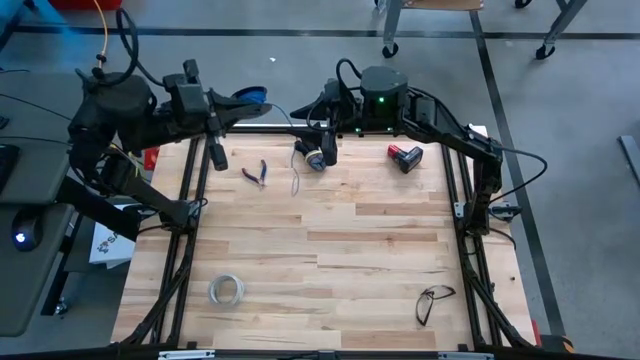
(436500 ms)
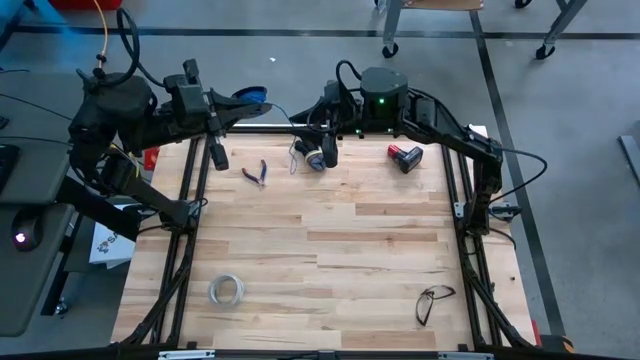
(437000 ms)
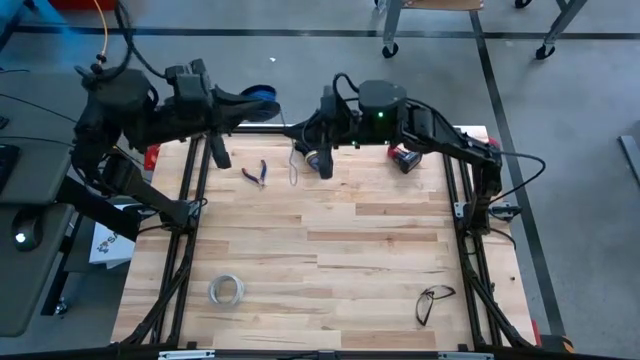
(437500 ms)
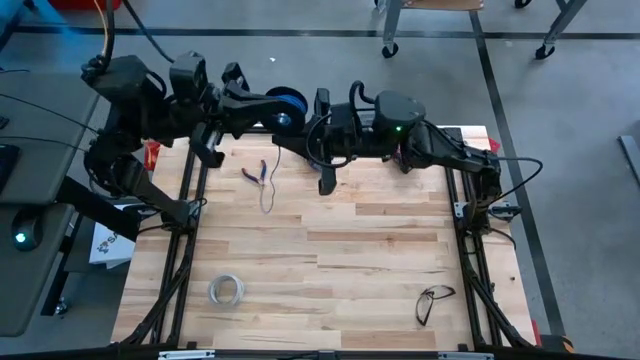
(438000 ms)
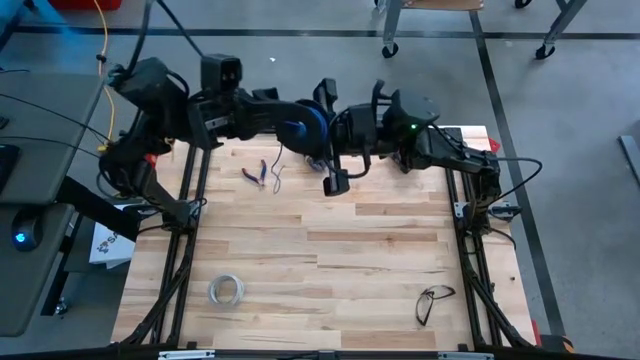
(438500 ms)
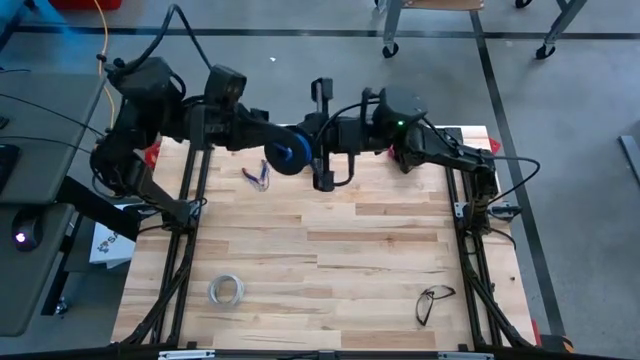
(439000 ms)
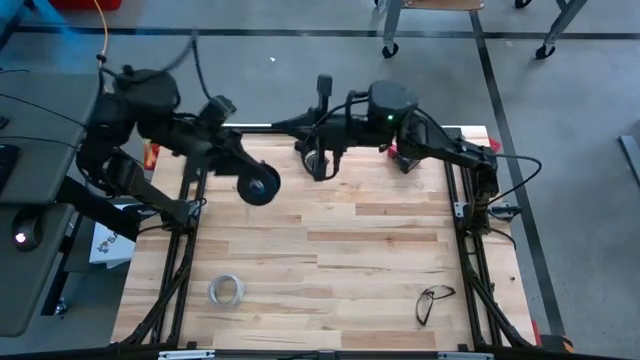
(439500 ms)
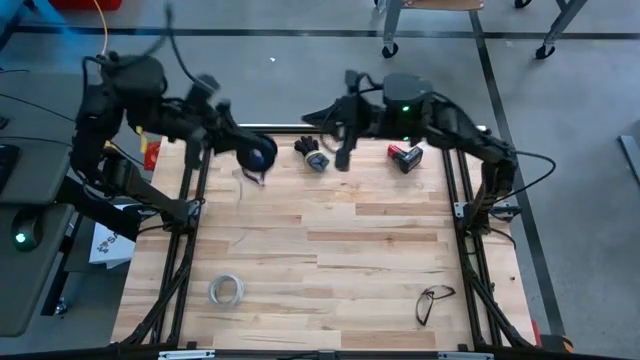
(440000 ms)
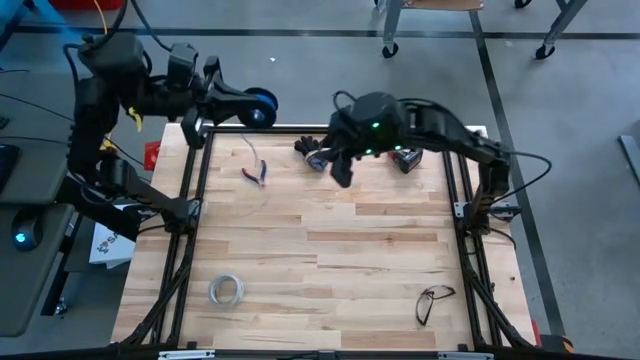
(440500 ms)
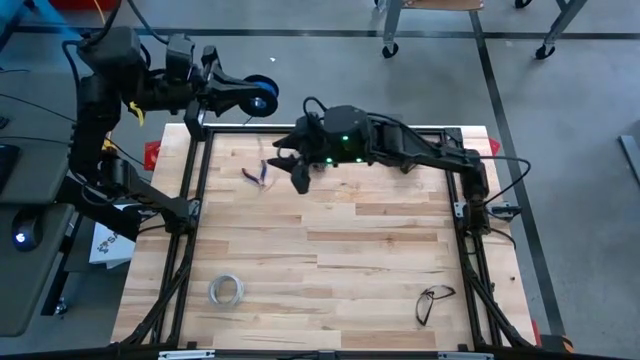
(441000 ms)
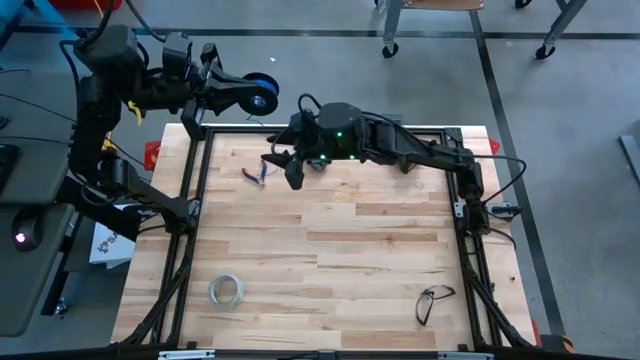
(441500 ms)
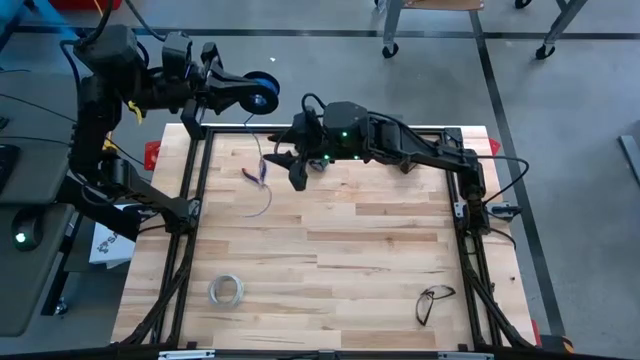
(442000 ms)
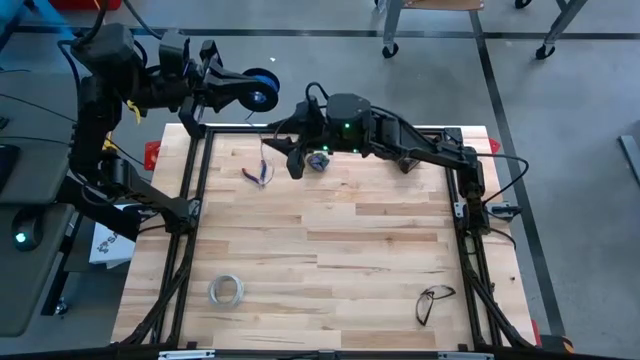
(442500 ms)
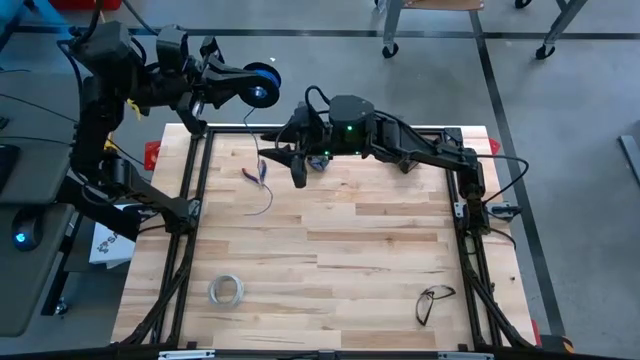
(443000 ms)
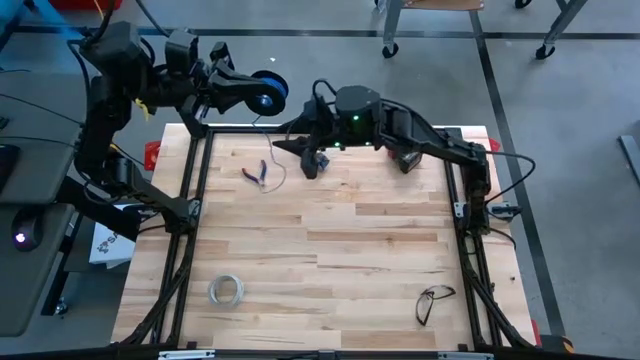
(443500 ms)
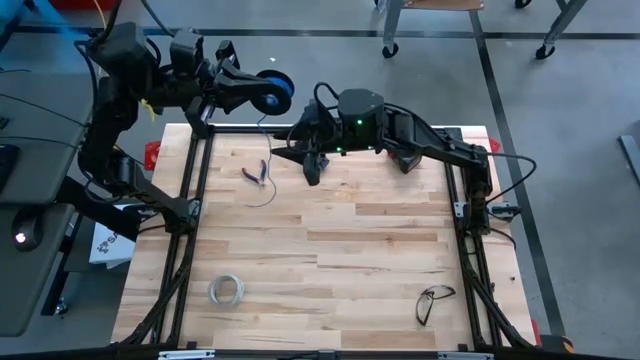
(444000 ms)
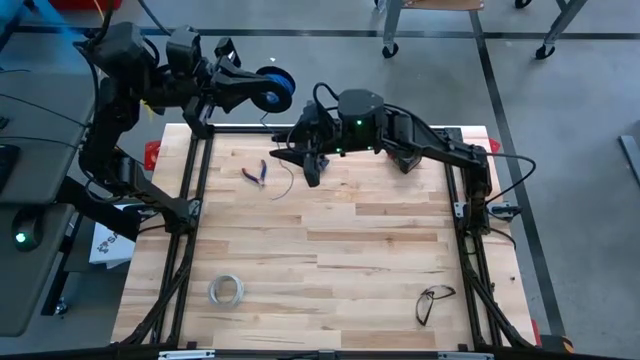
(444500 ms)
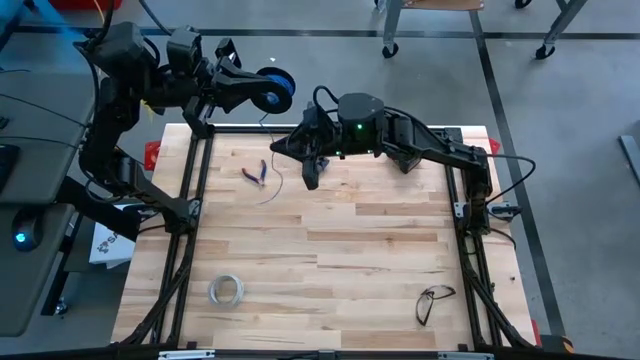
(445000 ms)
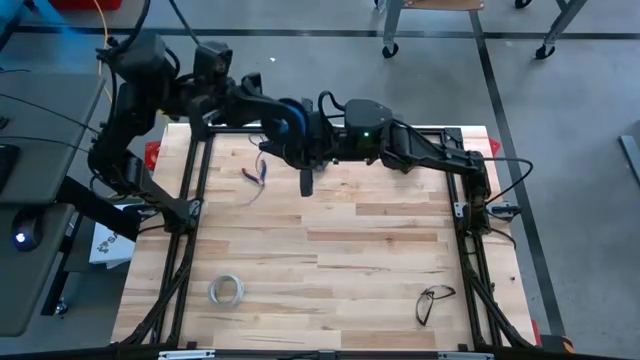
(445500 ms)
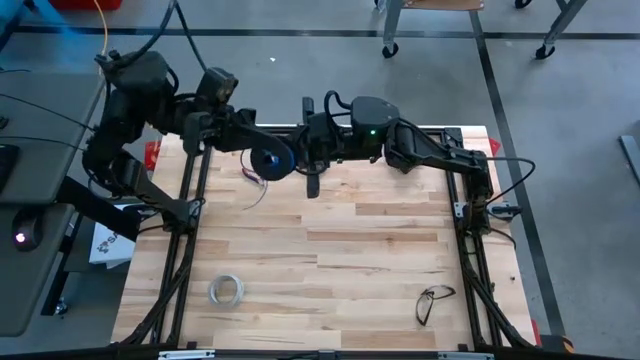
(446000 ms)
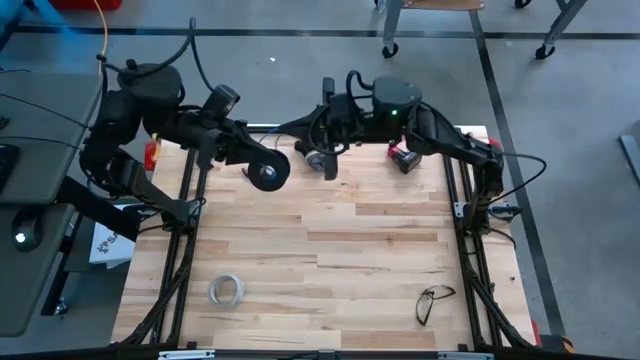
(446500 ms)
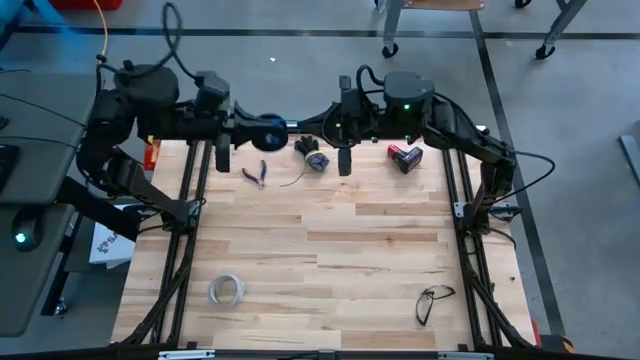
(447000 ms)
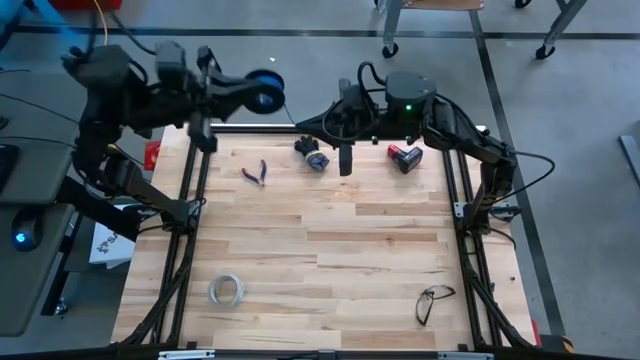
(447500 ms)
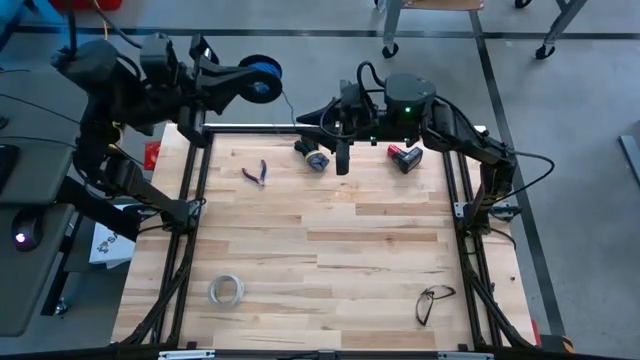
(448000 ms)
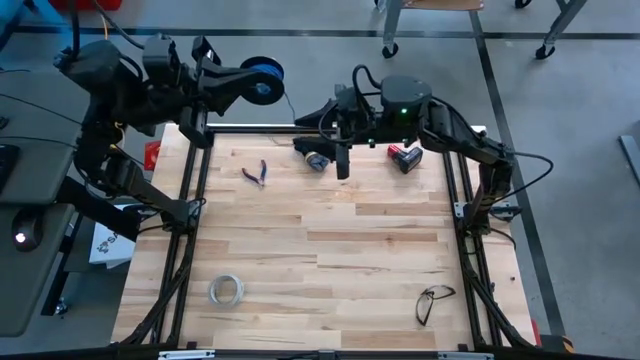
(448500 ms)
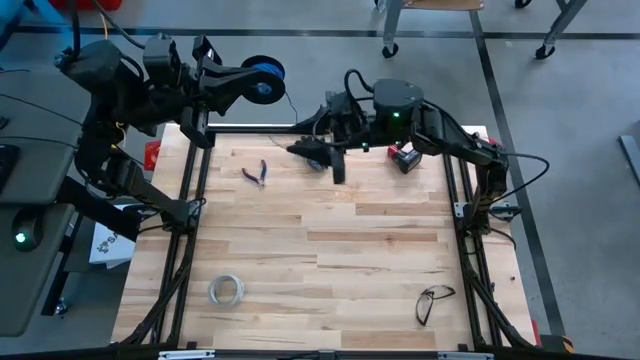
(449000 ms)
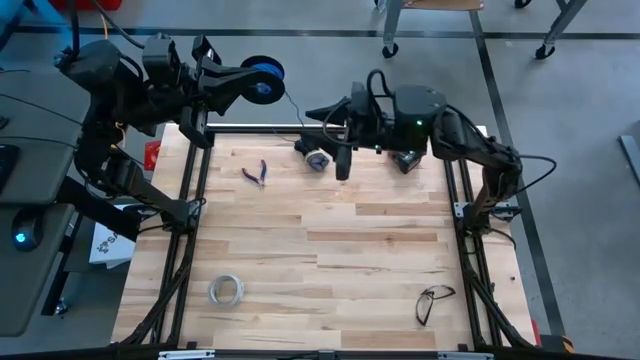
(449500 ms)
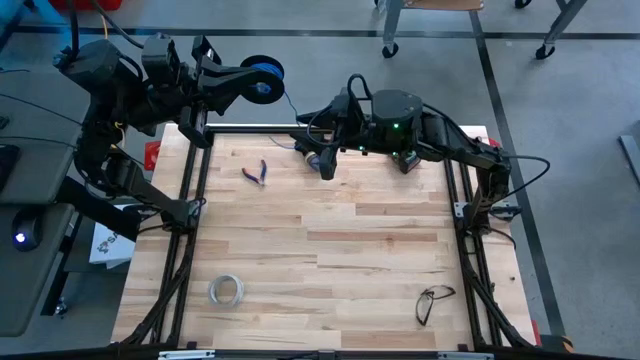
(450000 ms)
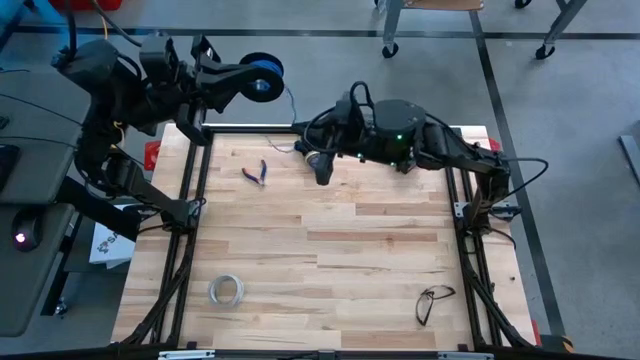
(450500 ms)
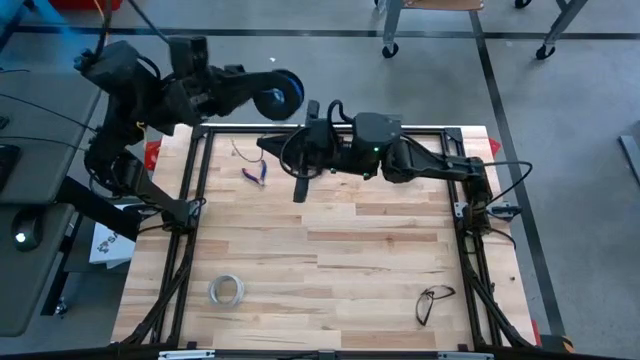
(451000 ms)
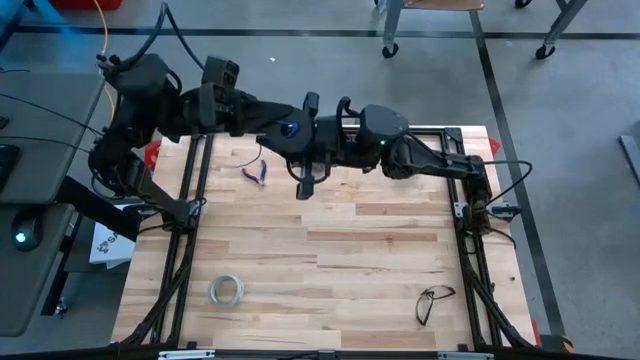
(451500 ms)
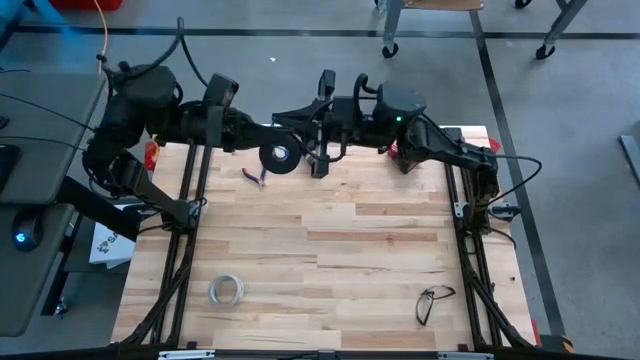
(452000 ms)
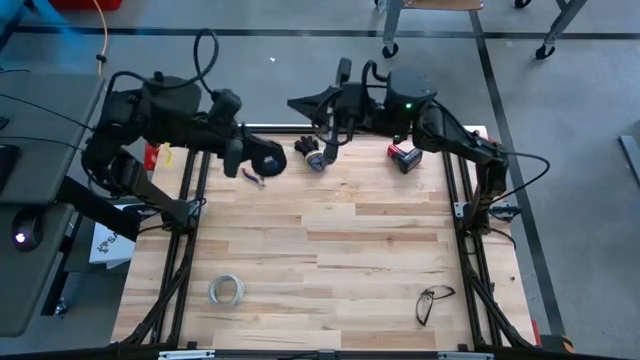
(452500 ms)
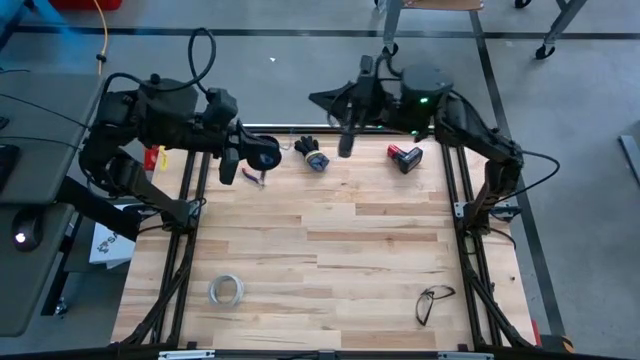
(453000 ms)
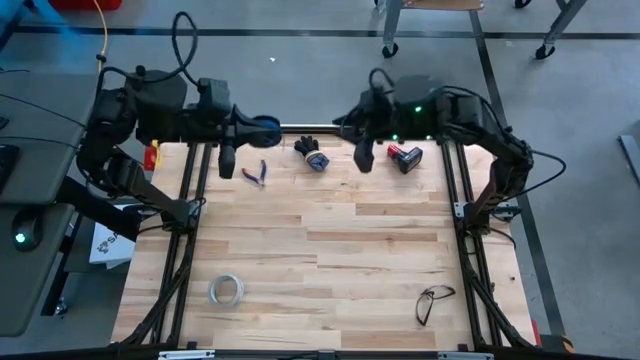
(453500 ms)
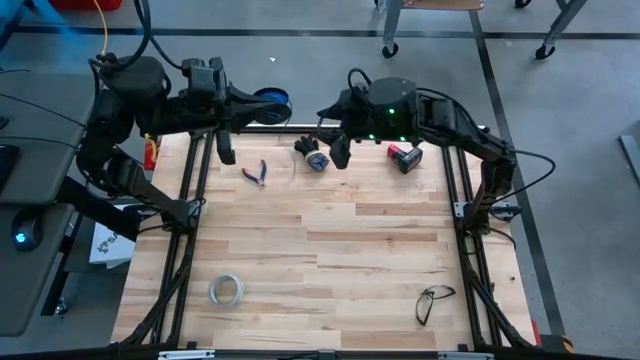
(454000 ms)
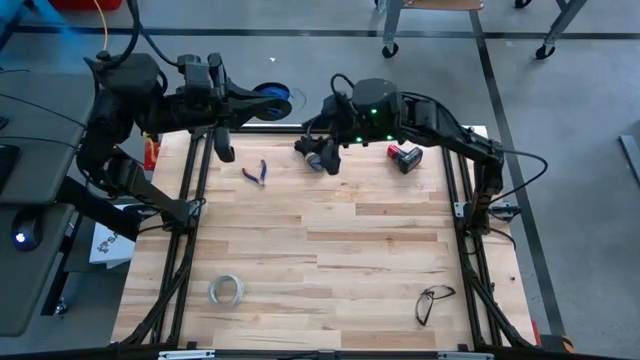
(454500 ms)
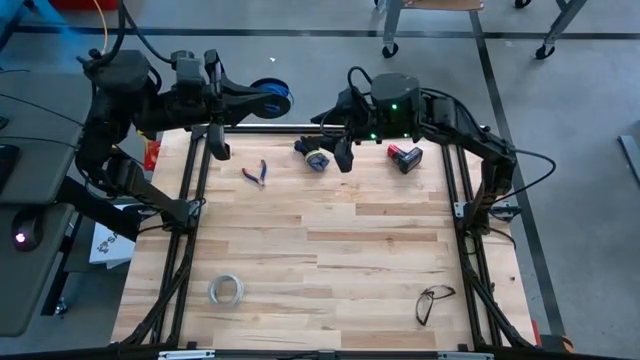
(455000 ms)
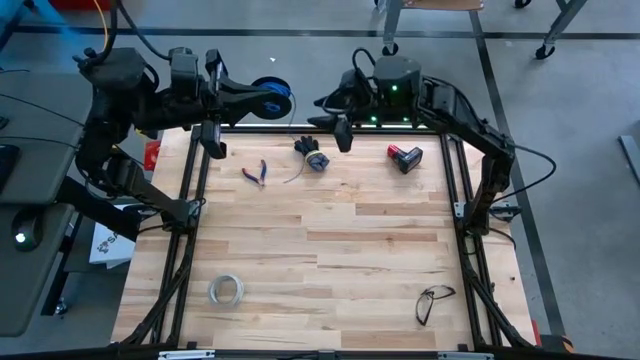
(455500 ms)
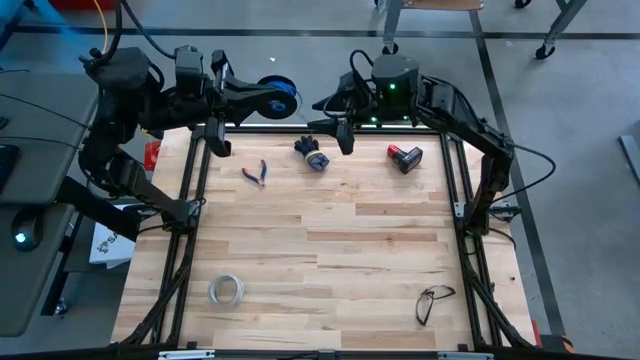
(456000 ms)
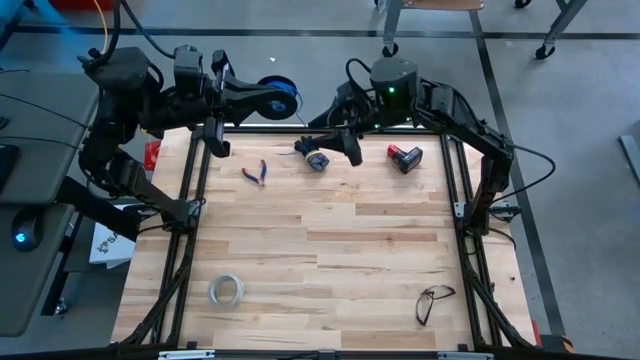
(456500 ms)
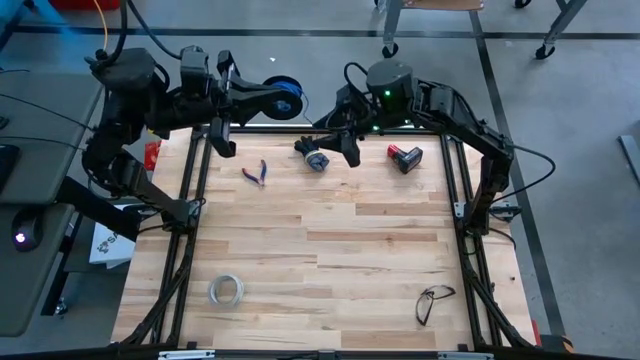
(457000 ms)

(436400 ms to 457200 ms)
Task: Coil cords
Coil the blue wire onto the black spool
